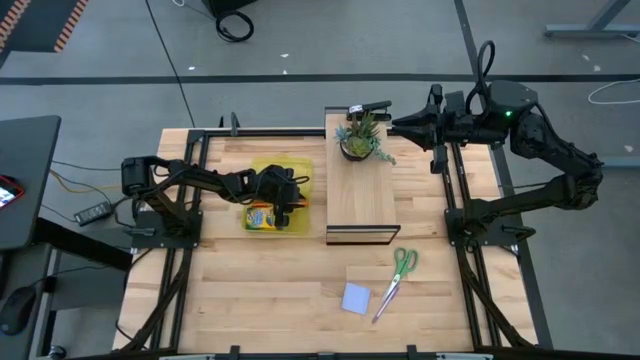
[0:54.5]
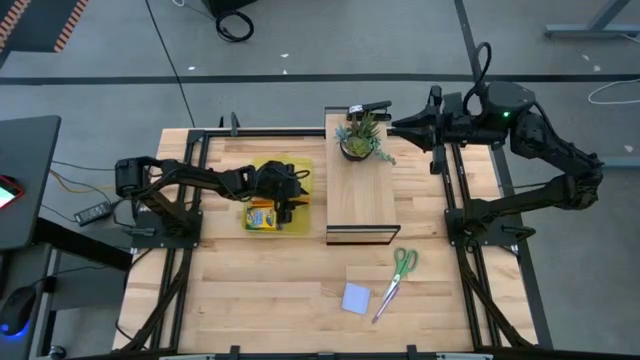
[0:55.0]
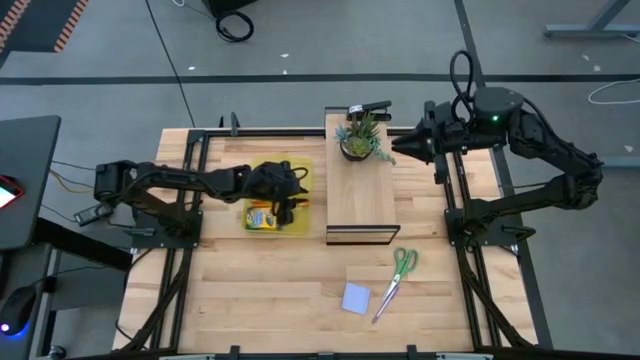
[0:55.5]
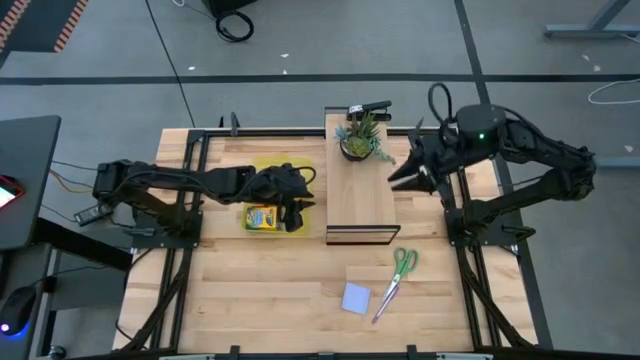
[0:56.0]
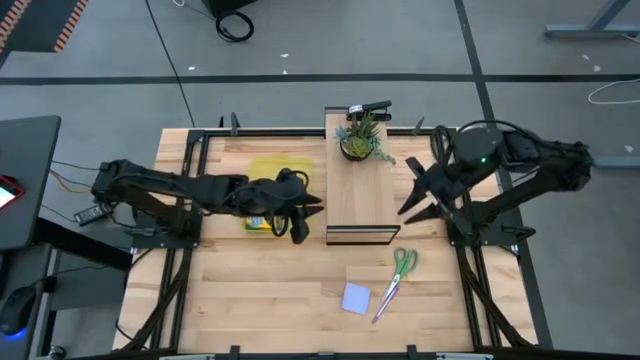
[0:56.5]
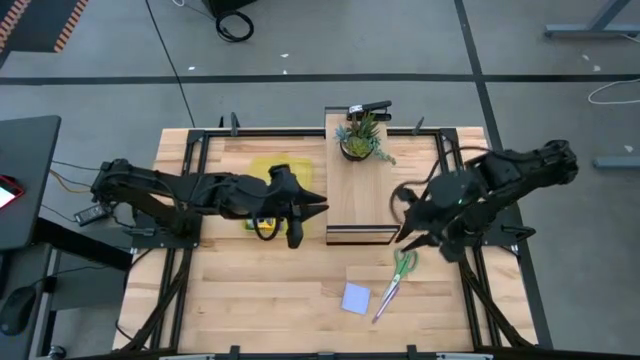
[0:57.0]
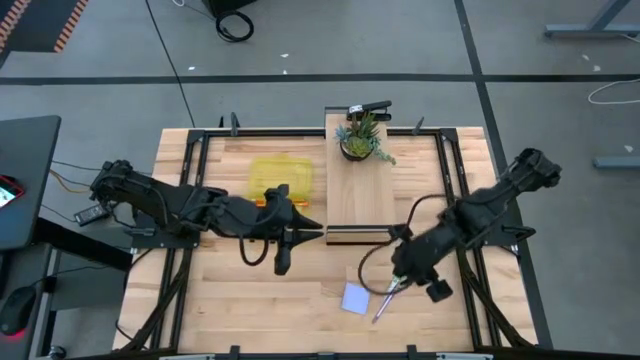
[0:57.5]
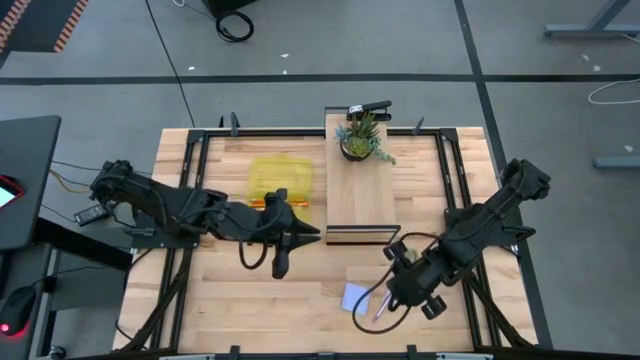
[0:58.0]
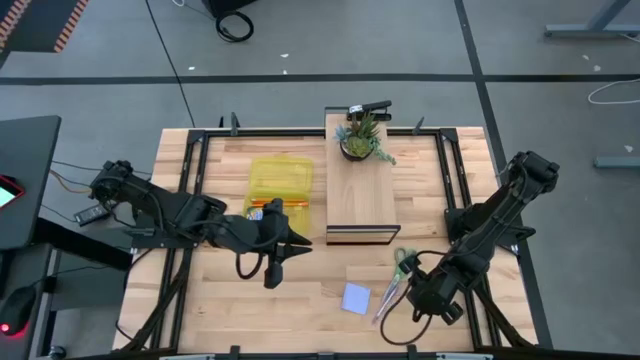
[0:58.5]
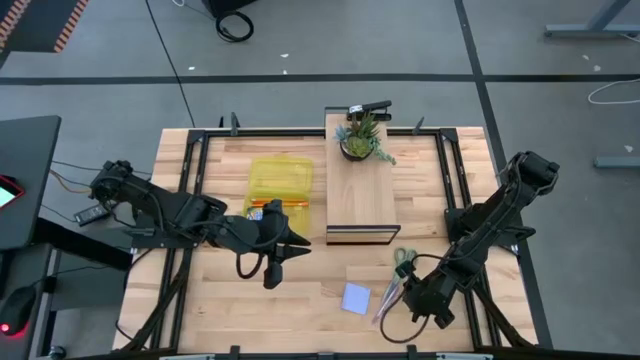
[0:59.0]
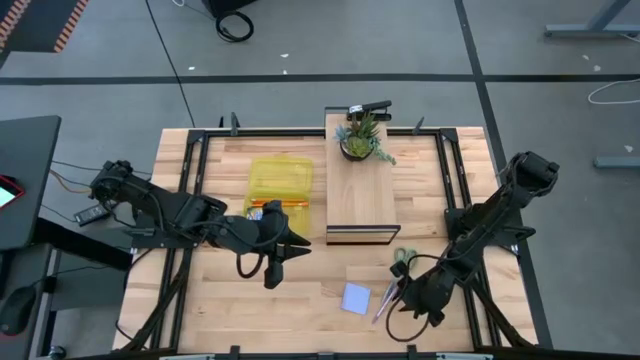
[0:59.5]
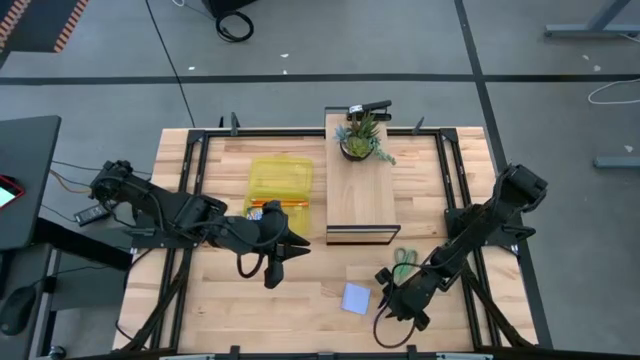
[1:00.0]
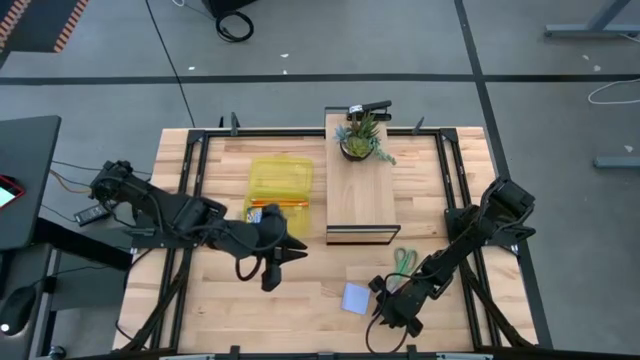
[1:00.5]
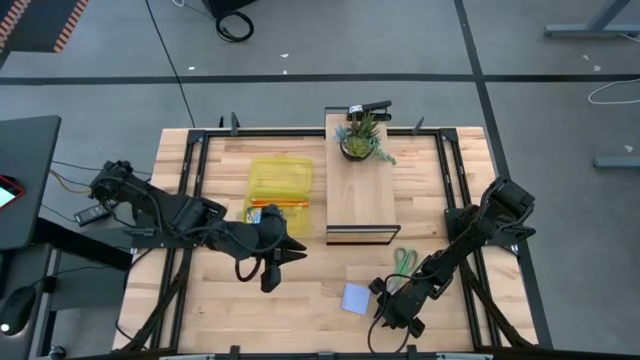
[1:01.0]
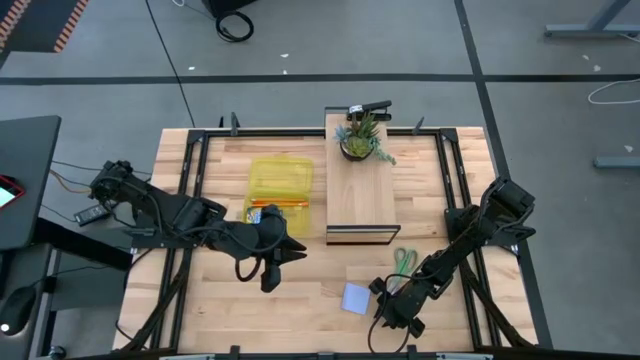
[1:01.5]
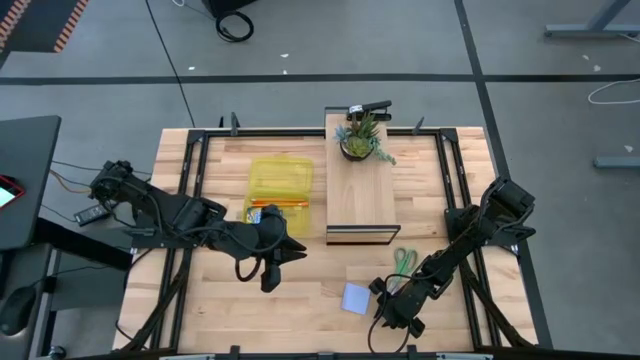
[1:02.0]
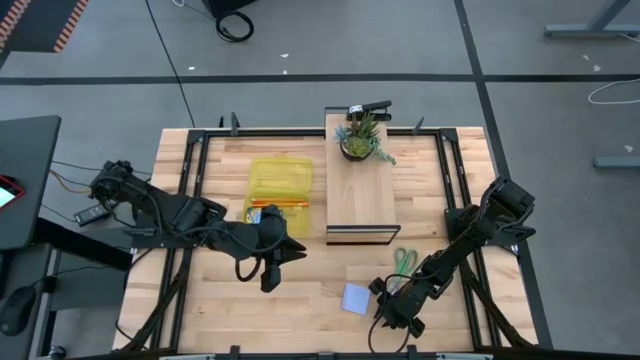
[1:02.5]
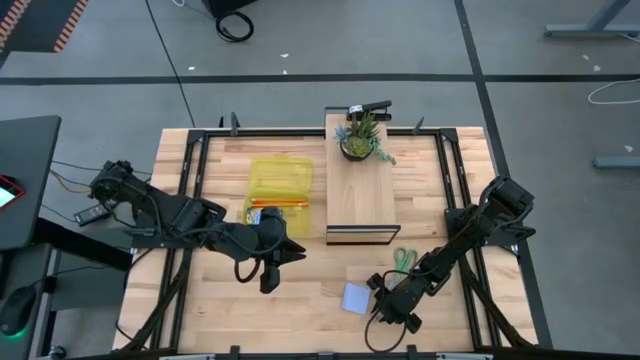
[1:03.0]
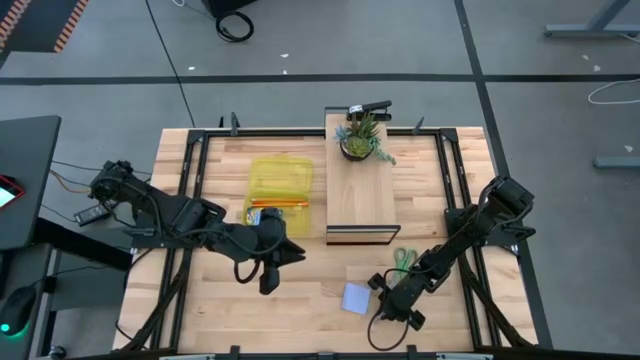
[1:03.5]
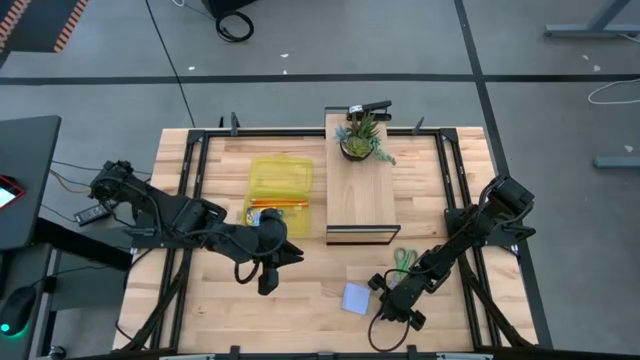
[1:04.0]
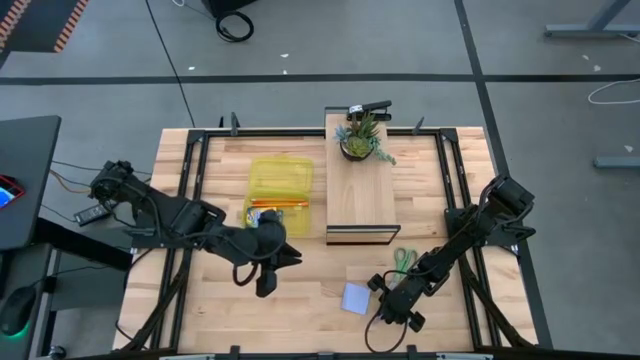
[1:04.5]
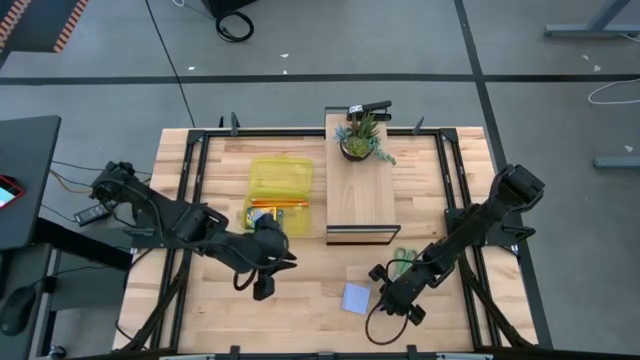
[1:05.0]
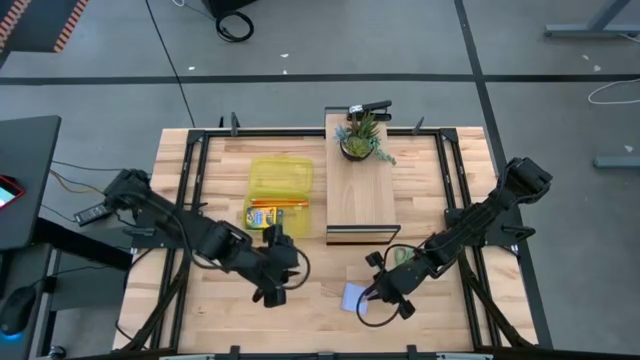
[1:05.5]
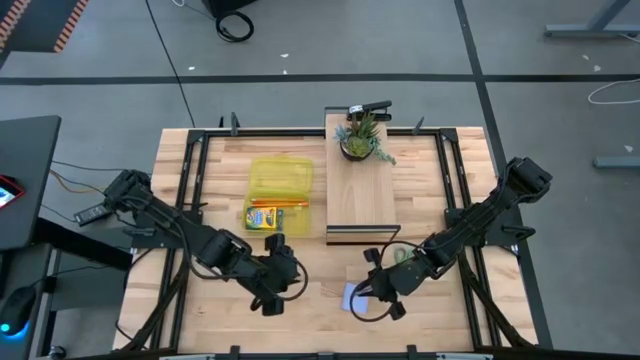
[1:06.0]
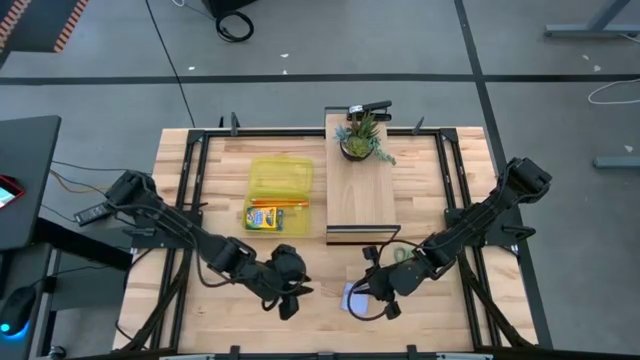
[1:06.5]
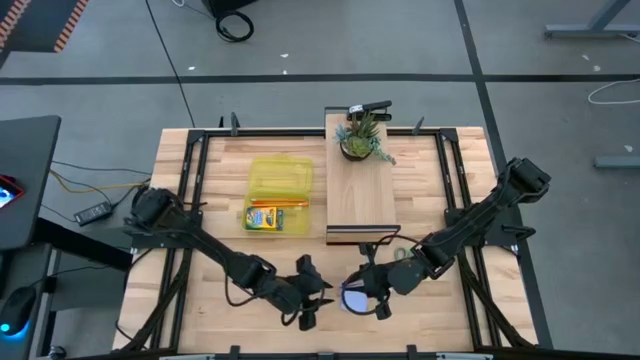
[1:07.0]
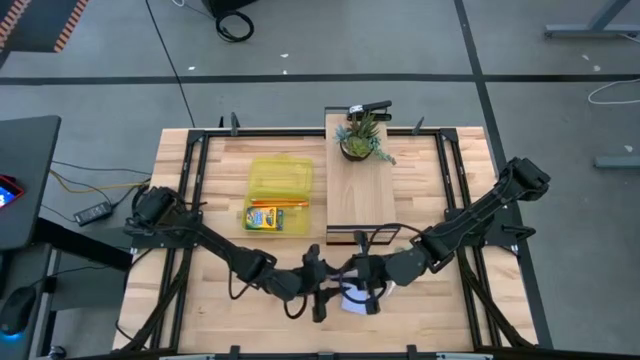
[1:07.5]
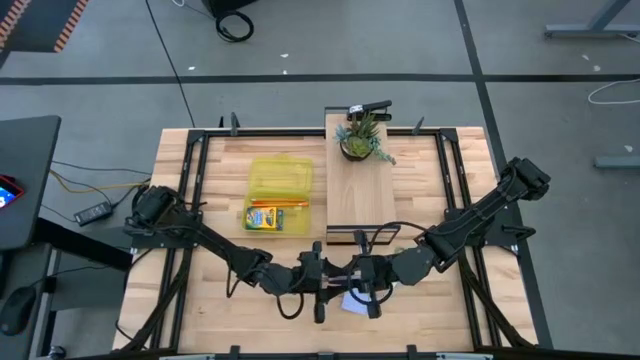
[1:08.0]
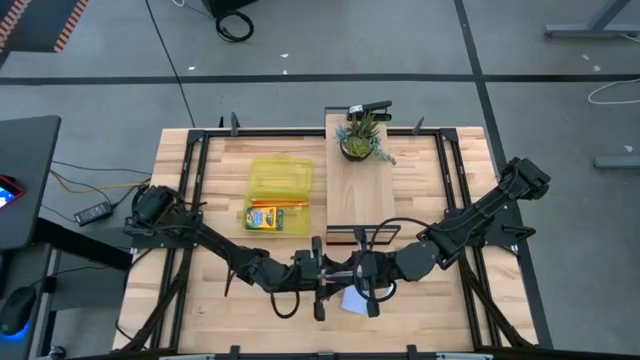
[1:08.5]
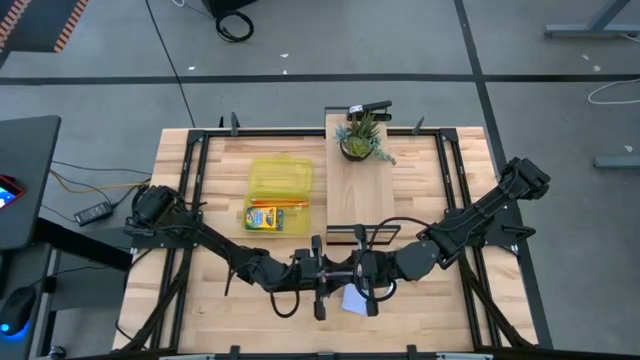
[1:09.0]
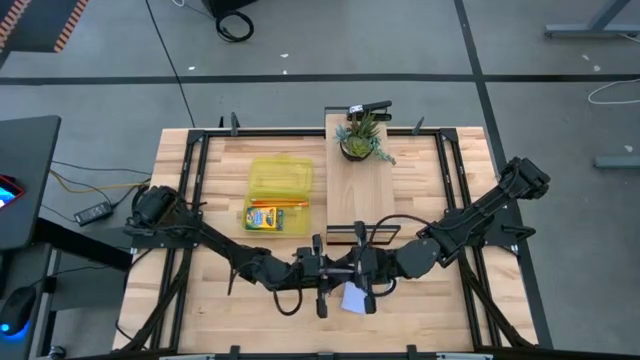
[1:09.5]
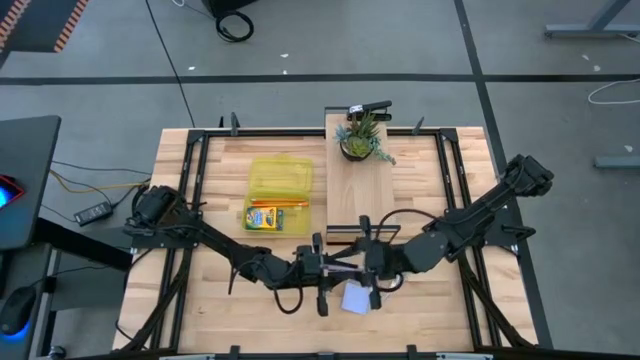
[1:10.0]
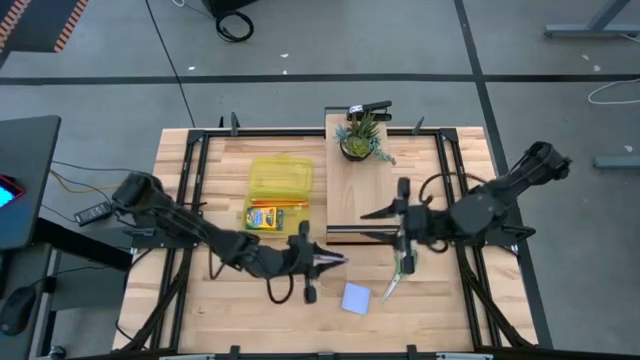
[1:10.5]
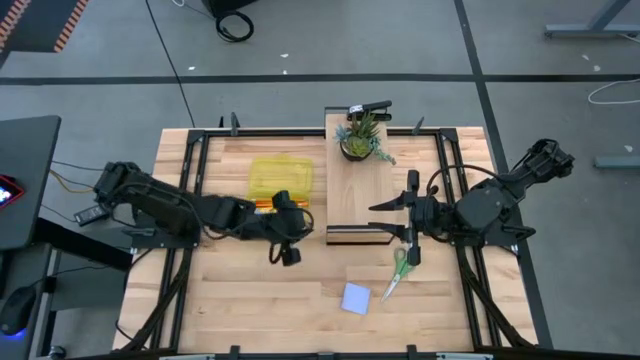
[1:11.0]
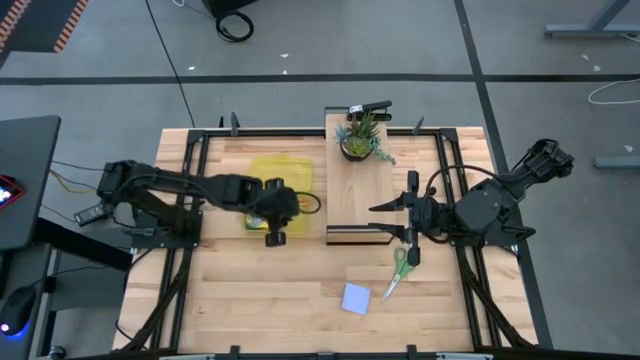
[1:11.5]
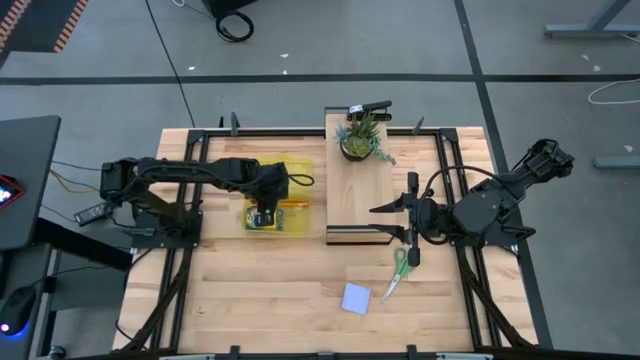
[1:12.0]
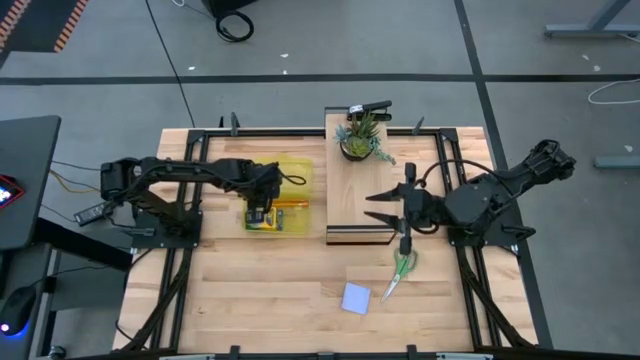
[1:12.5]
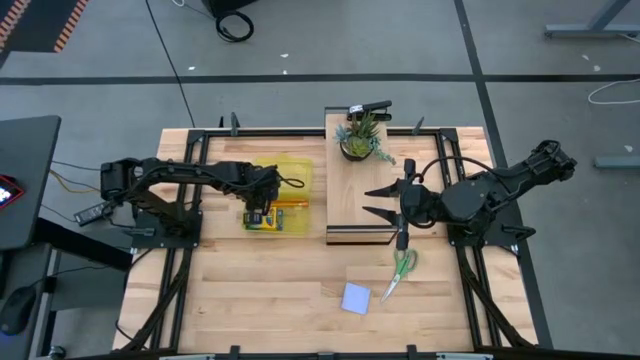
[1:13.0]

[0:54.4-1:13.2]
Task: Pack school essentials
Put the pen into the supply box
